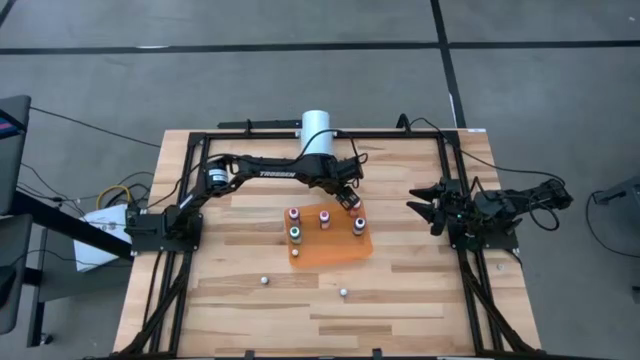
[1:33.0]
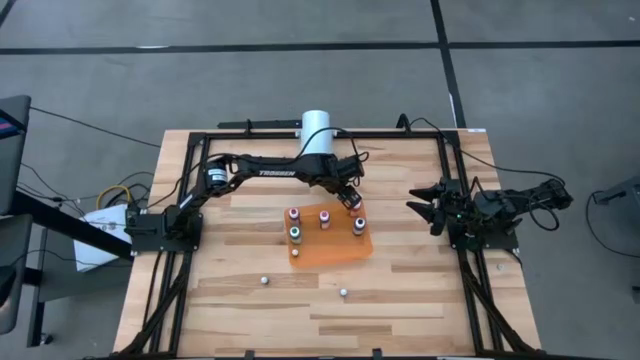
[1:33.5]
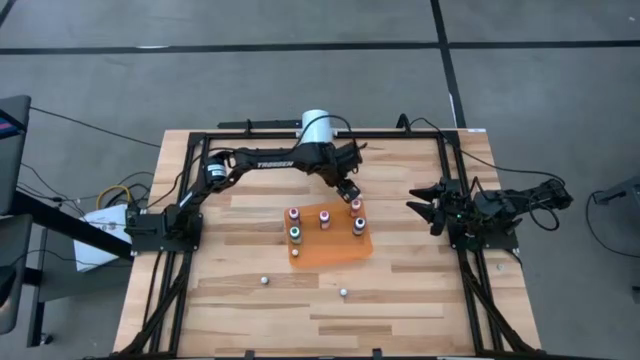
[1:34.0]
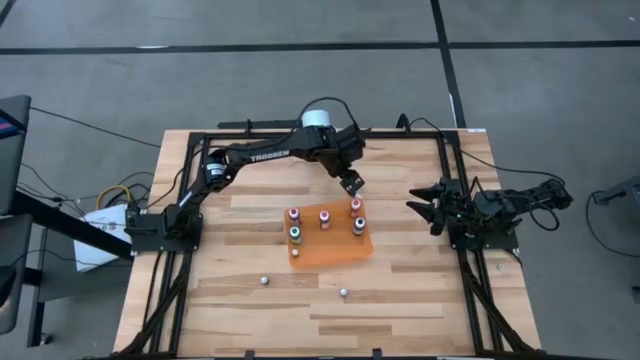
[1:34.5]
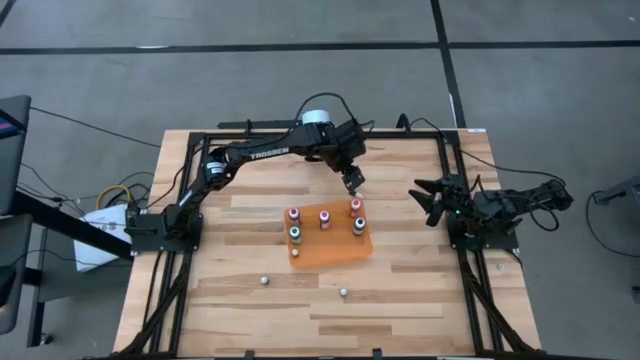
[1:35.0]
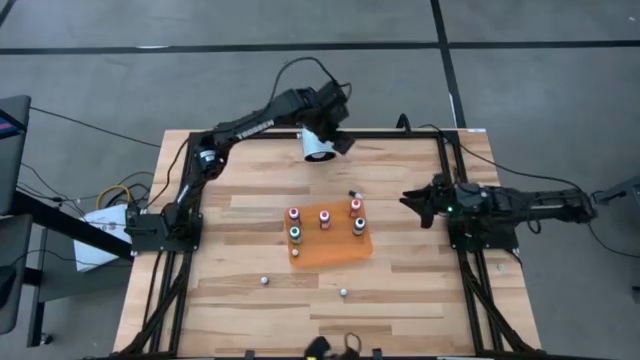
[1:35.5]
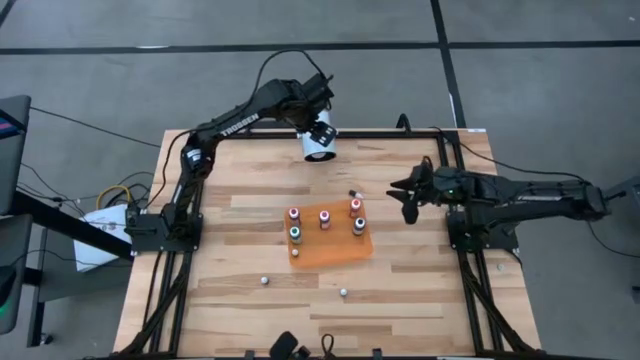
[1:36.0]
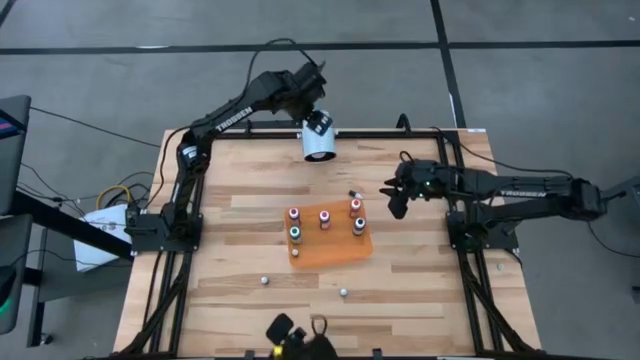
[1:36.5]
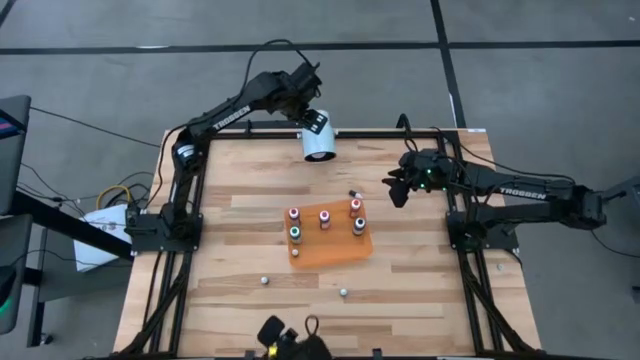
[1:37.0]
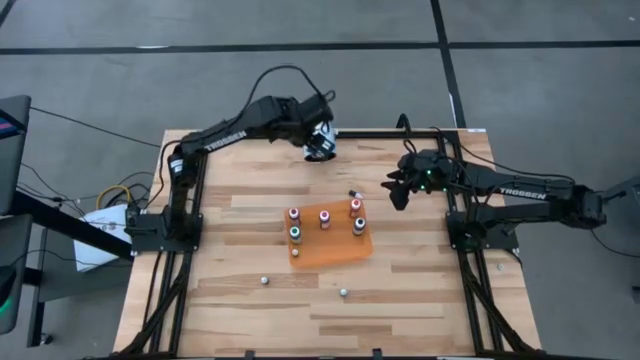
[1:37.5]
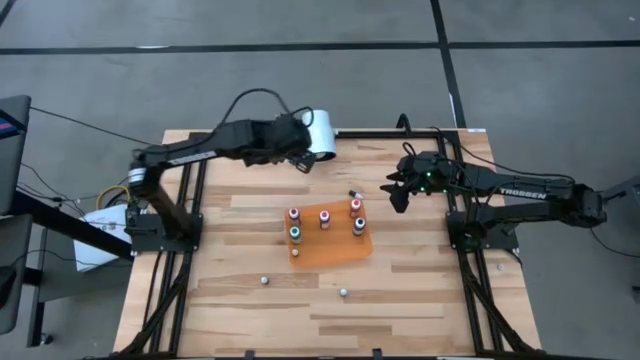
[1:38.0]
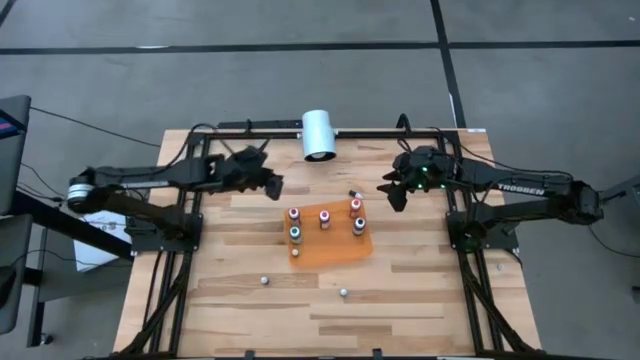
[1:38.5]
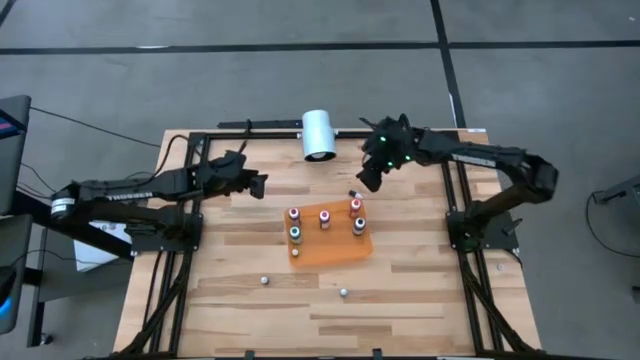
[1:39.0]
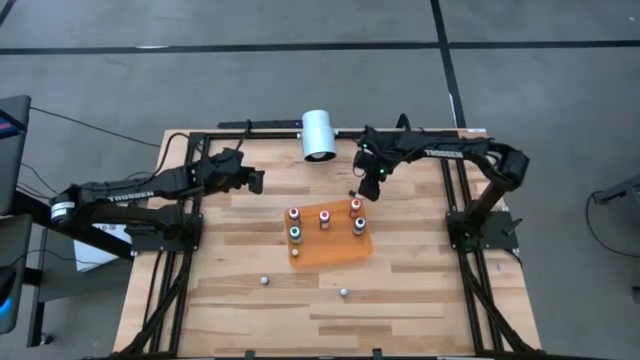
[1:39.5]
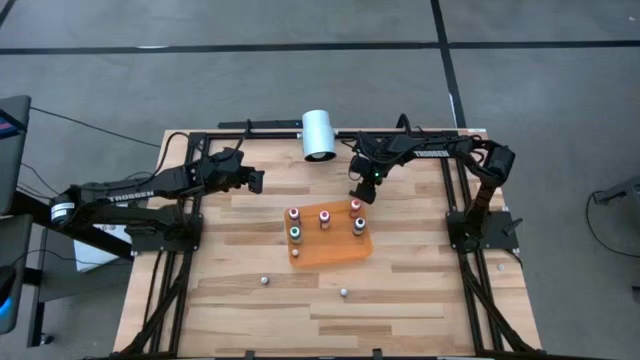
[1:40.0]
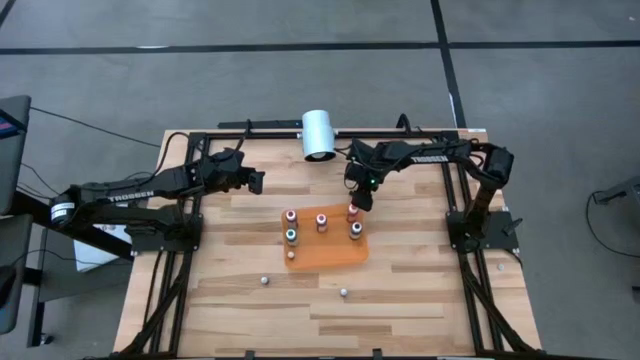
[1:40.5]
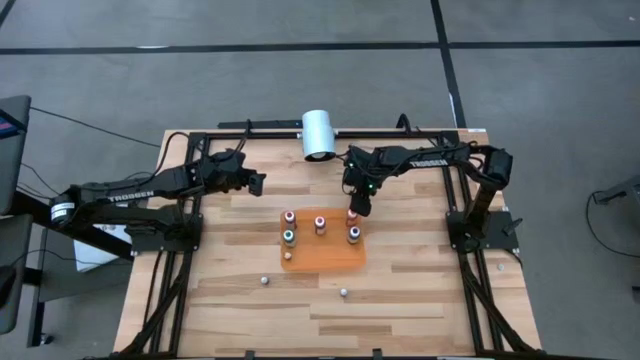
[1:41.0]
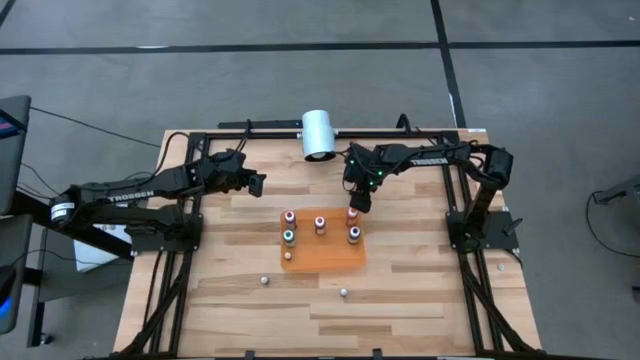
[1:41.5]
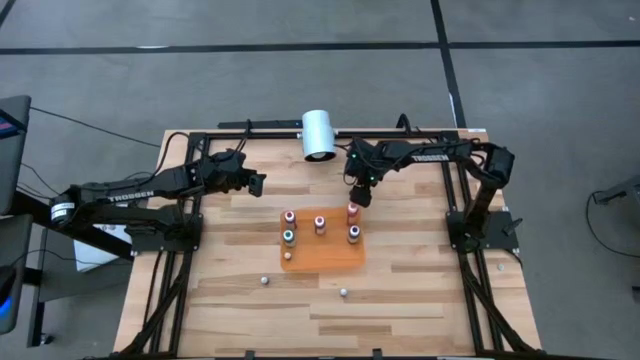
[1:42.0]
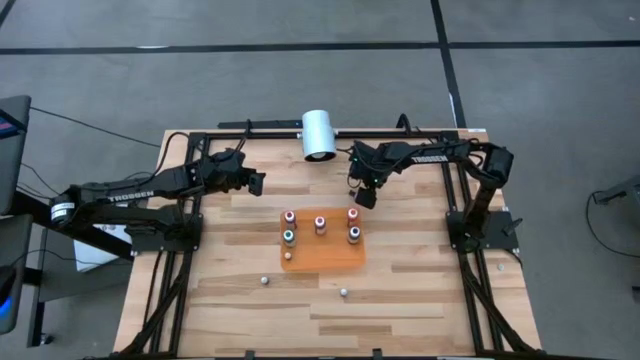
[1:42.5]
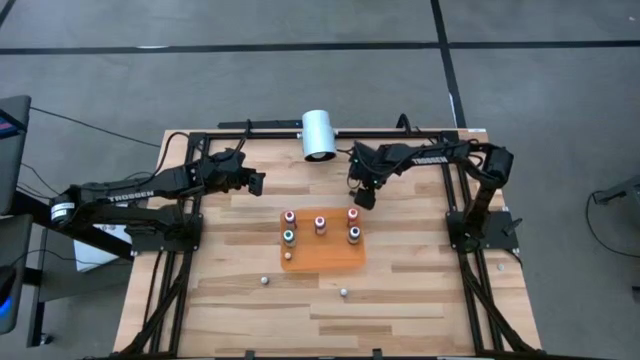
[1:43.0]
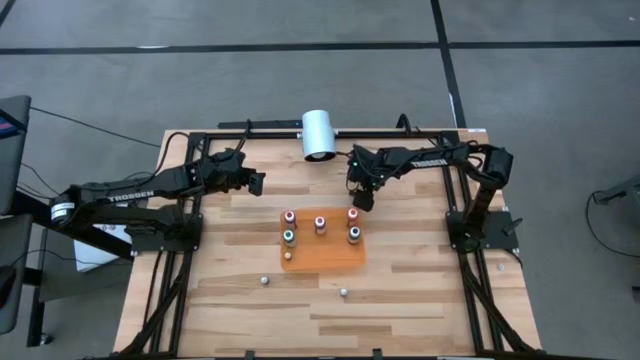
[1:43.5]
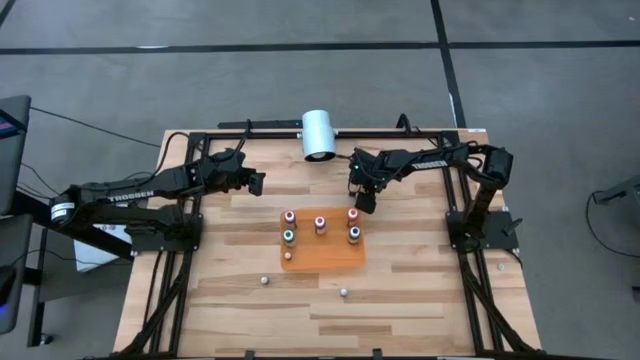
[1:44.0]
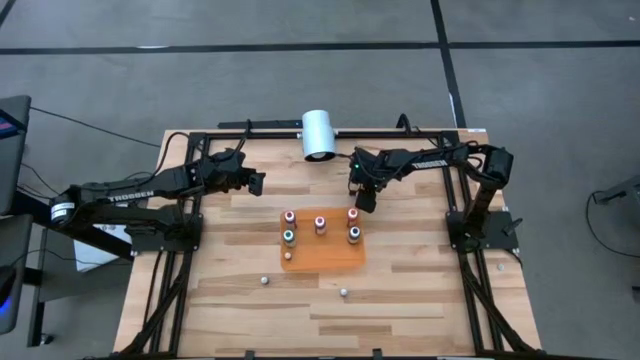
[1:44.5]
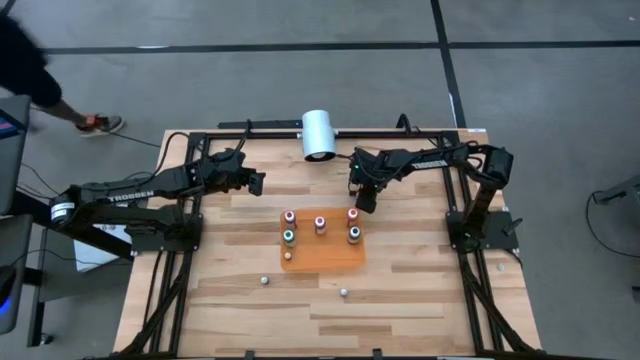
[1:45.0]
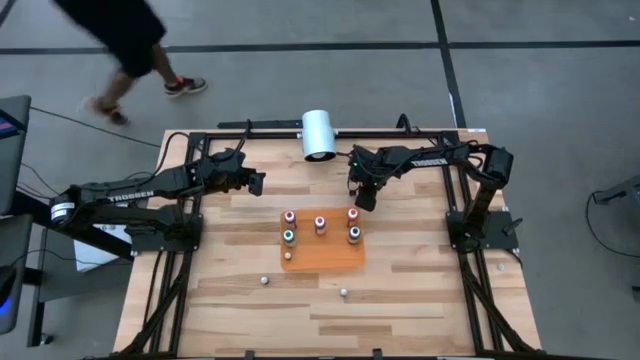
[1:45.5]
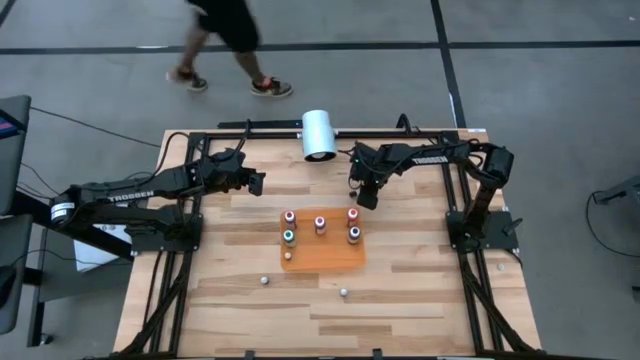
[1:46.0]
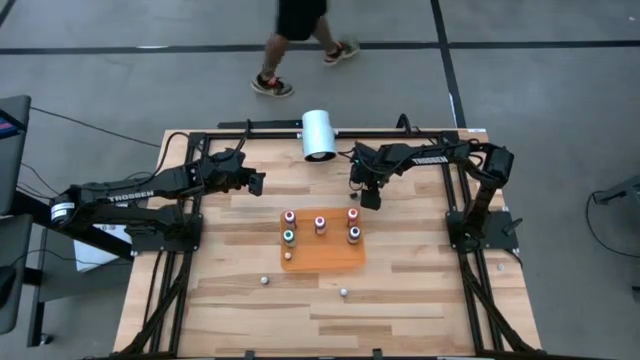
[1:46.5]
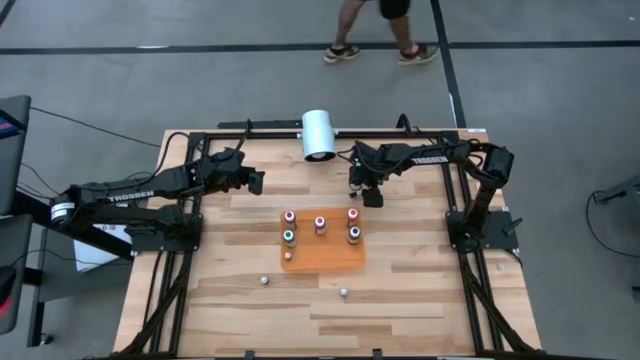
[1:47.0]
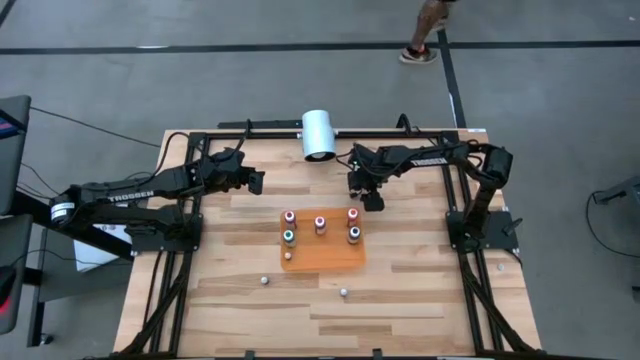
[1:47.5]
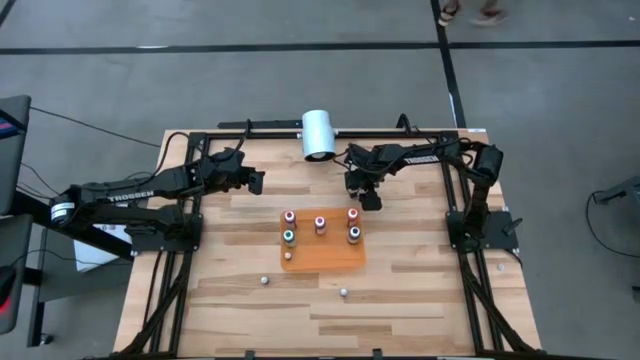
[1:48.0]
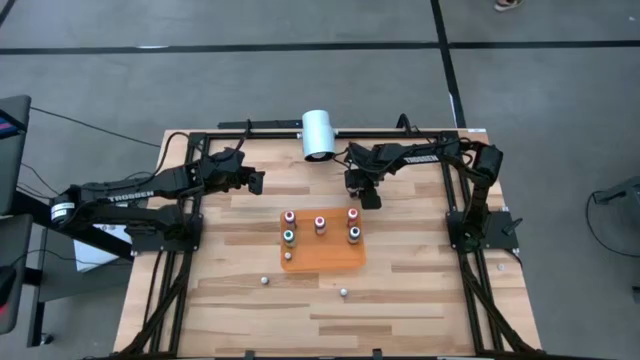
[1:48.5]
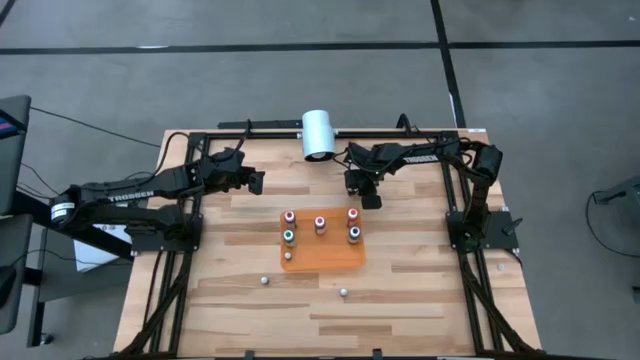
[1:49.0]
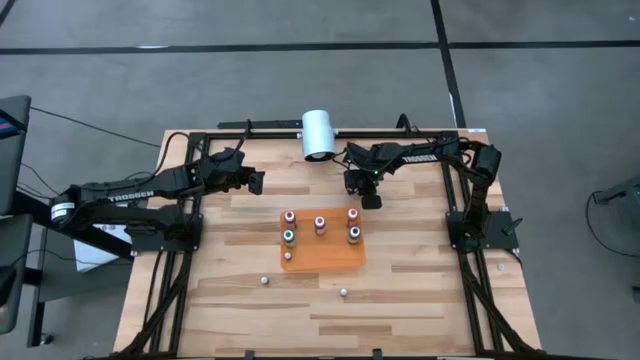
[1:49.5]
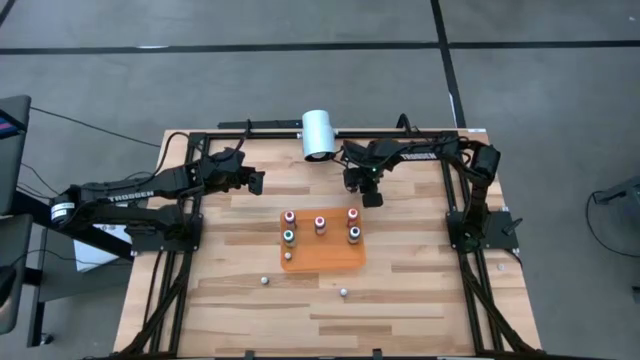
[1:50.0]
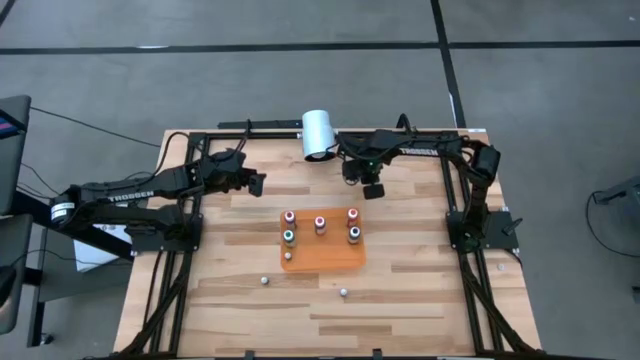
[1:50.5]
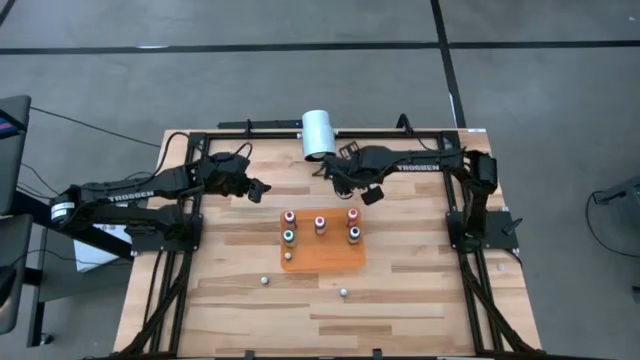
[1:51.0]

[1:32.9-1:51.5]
Task: Pick & Place food coloring
Put the small brown food coloring bottle into the orange container
